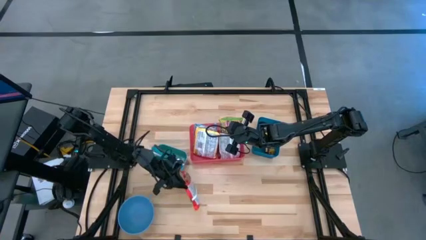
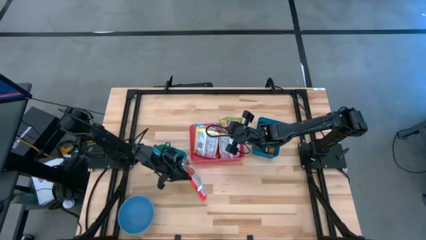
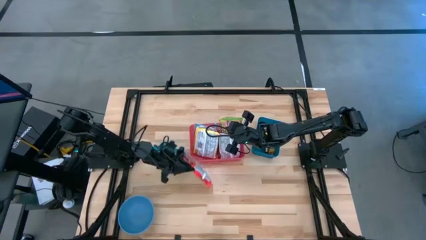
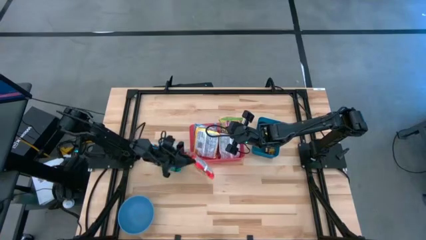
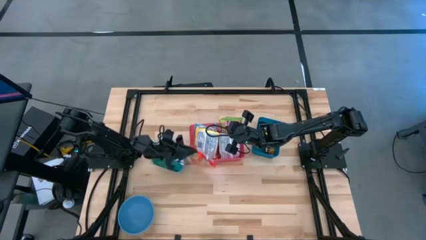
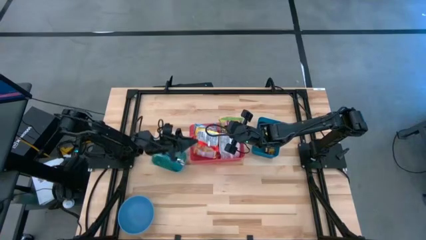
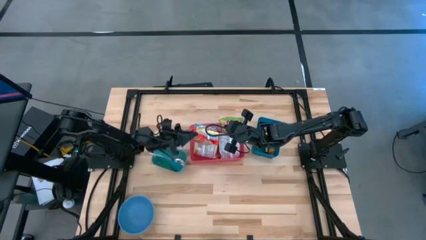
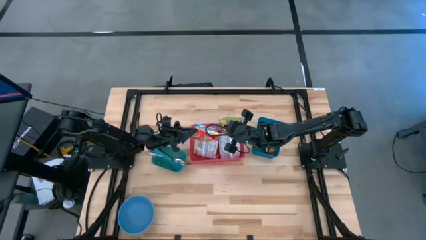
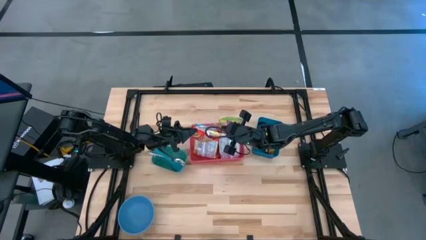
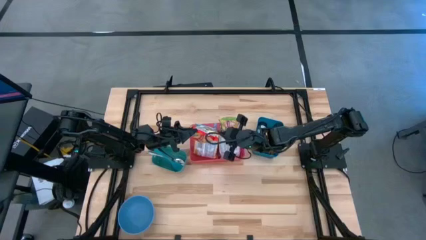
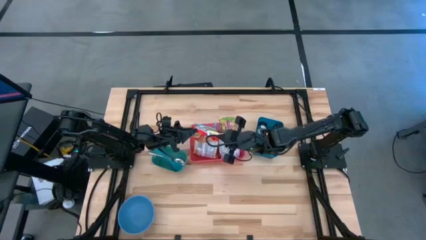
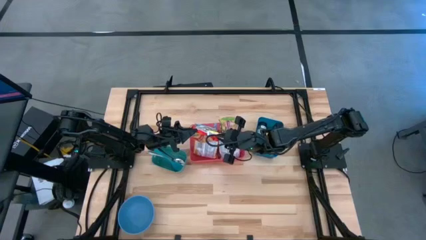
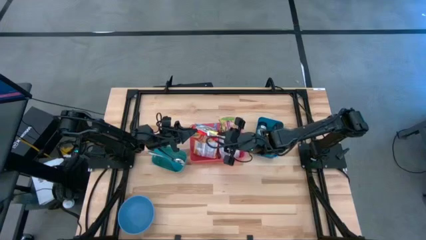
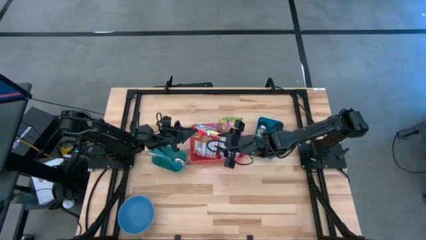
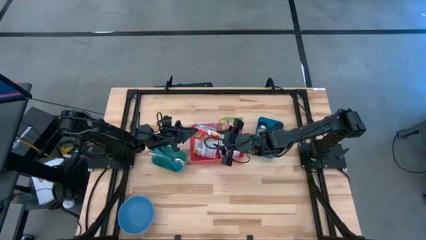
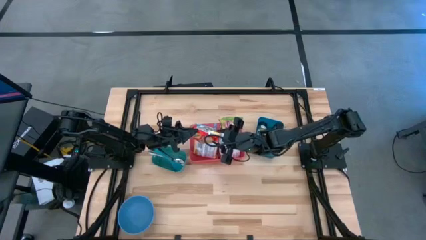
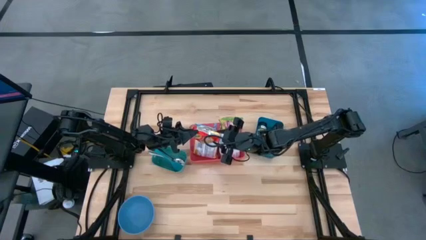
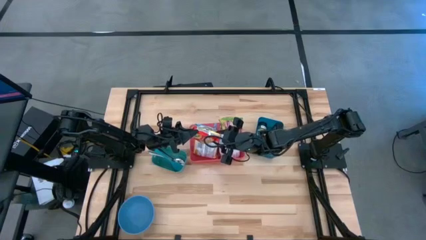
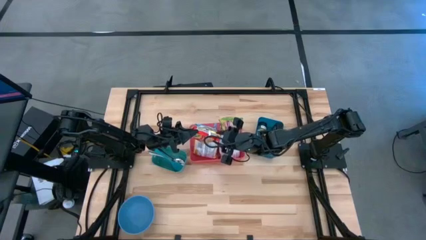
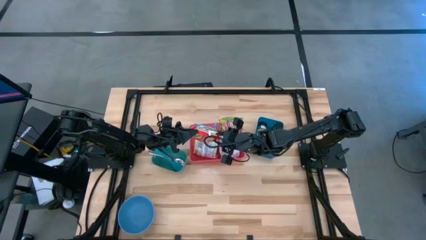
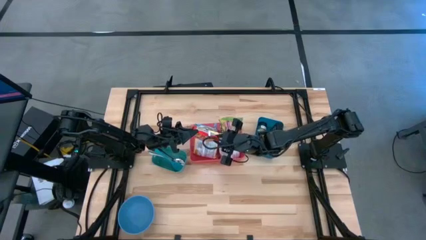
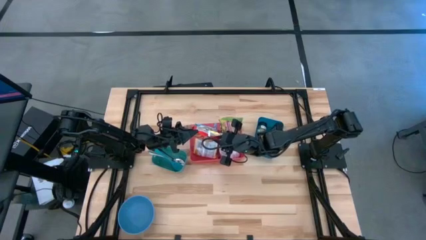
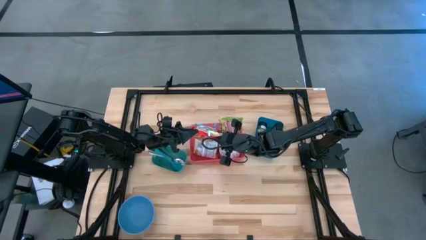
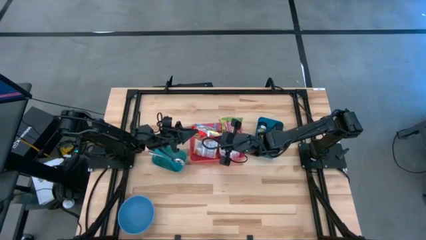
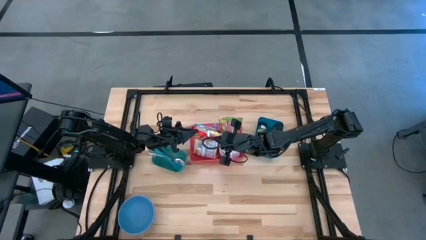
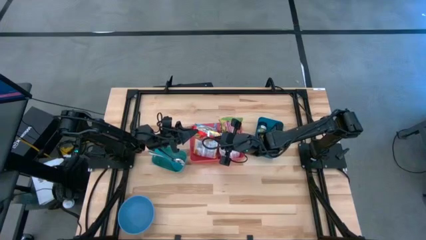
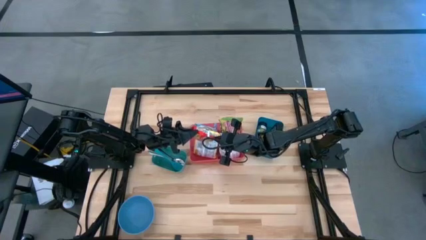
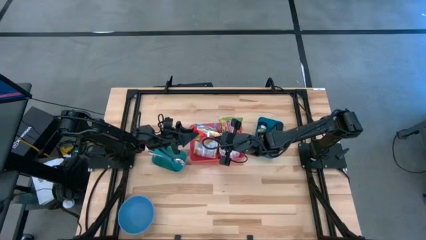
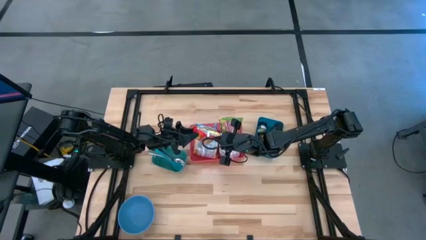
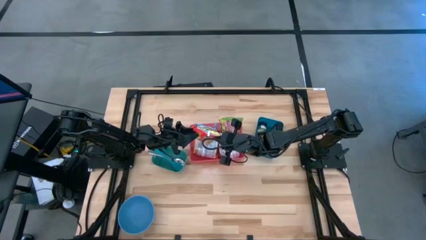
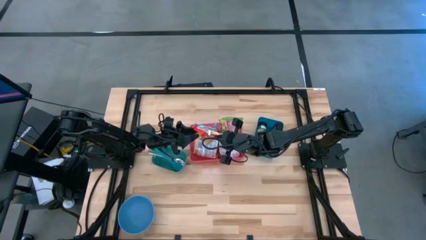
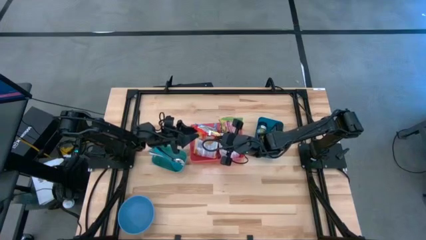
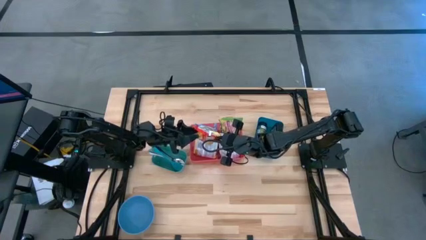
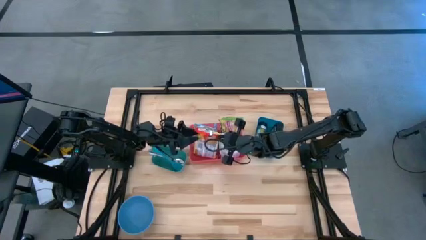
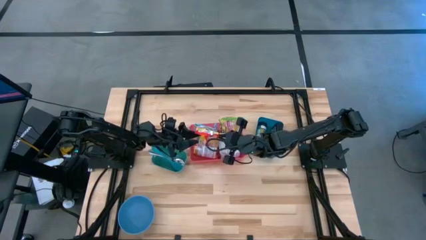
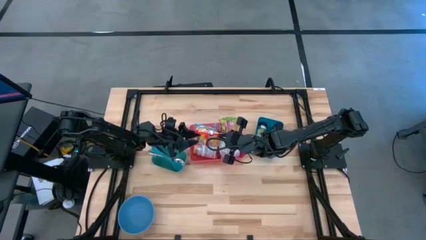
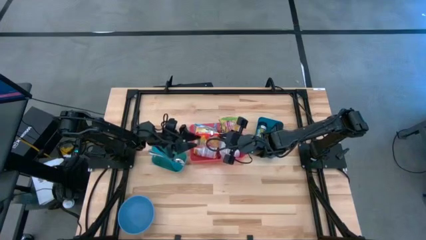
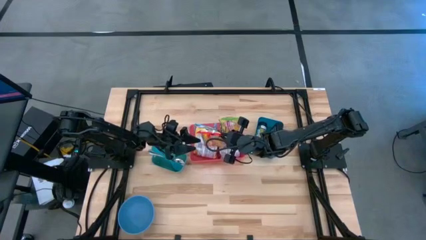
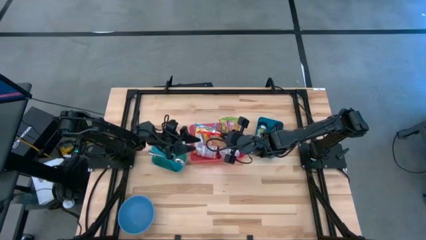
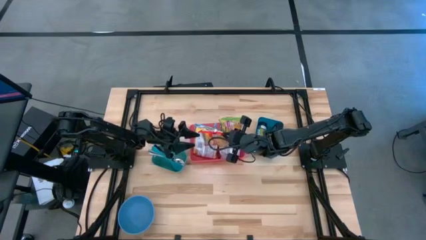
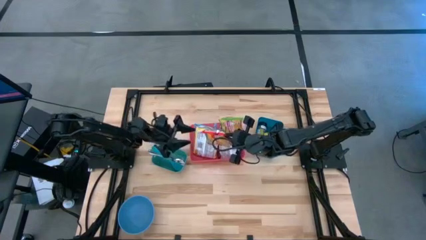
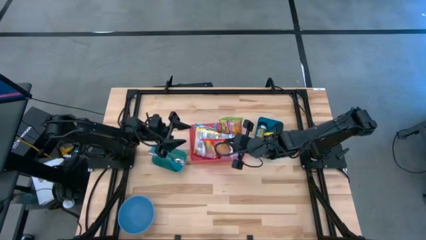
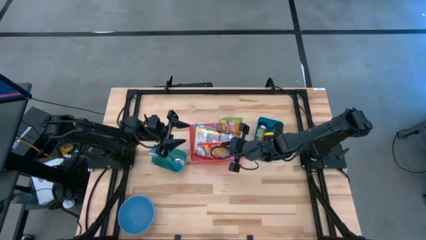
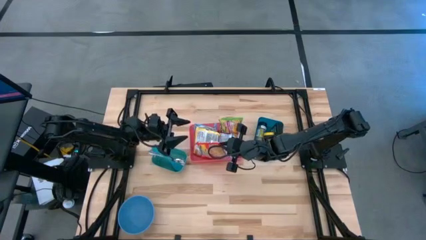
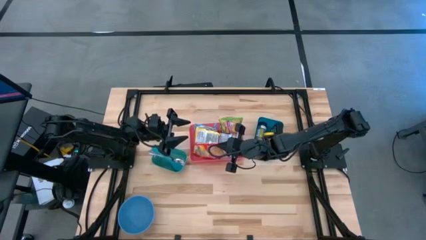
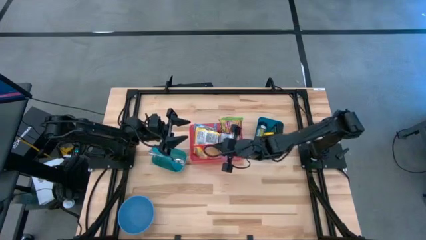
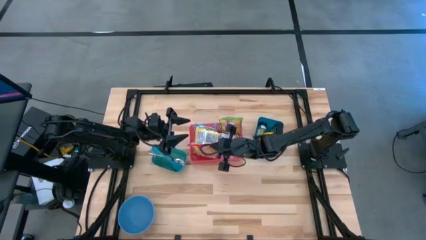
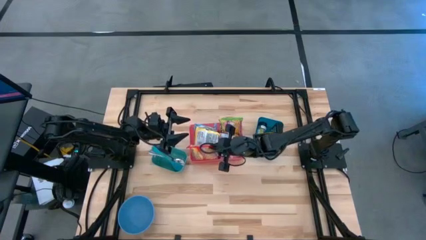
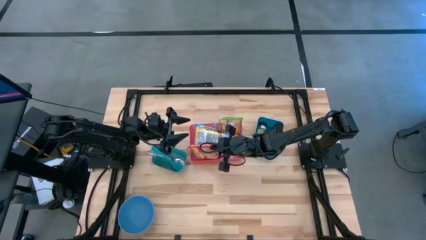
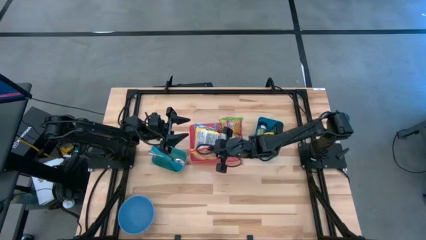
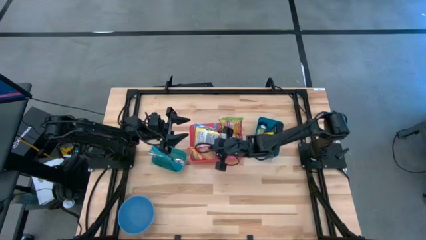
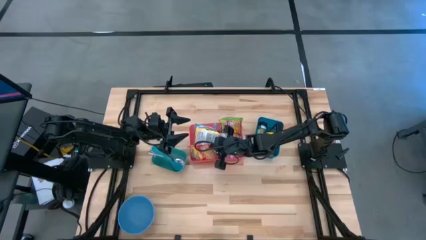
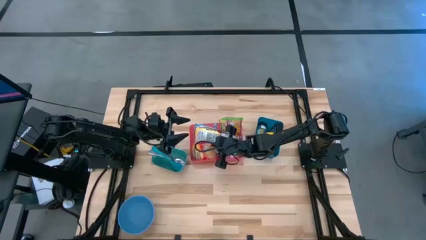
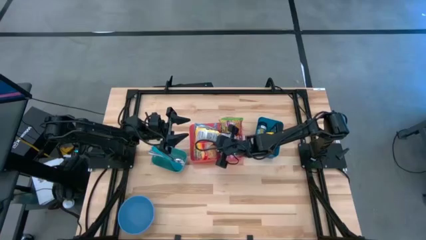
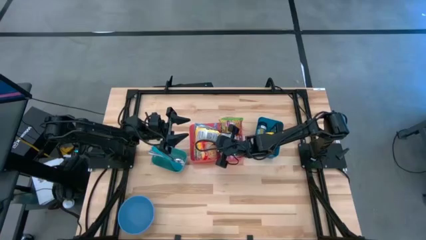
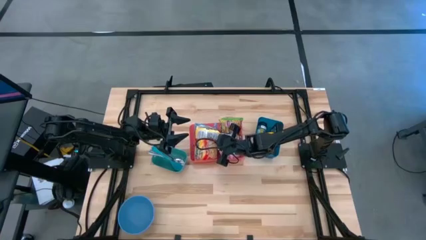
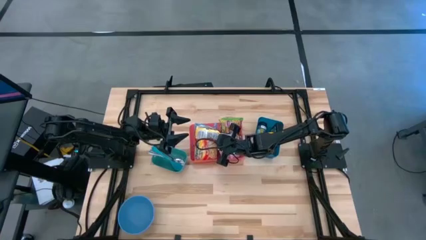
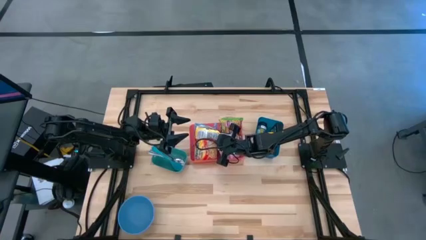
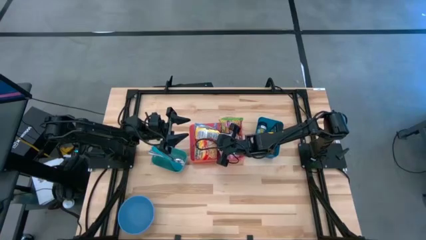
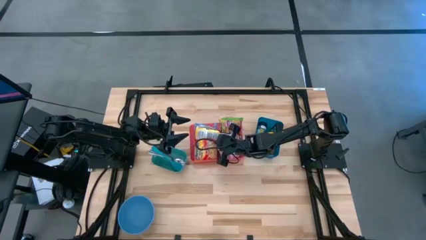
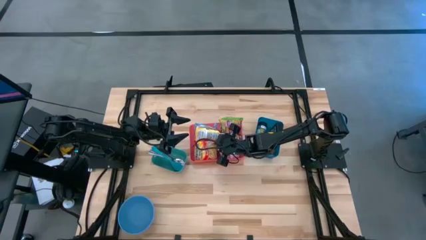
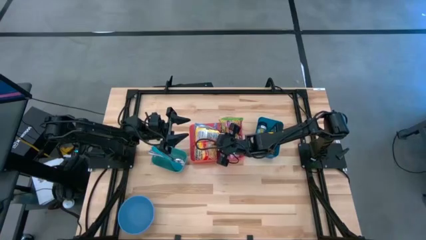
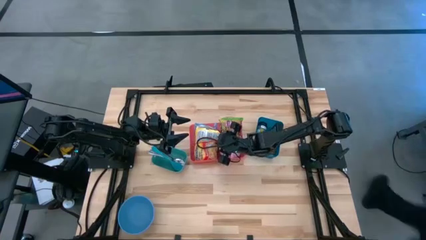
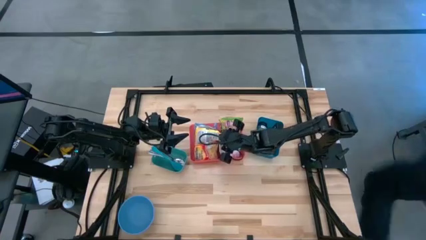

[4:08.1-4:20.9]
Task: Pick & Place Food Item
Put the orange noodle pack into the red bin

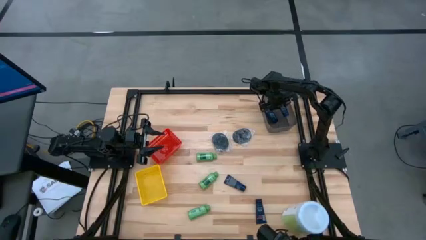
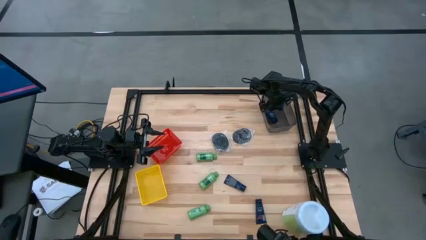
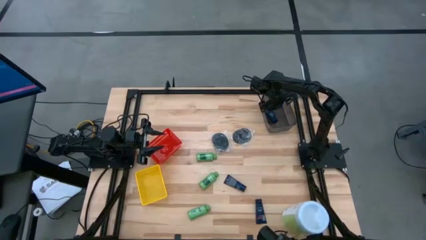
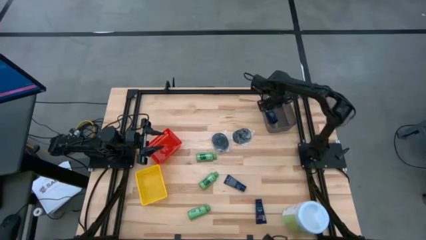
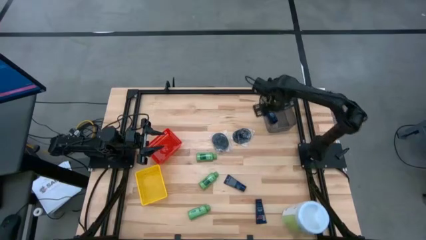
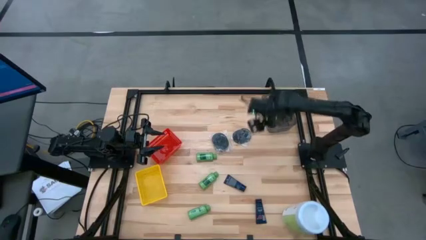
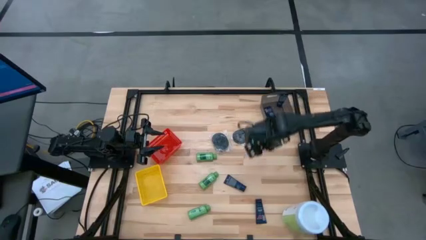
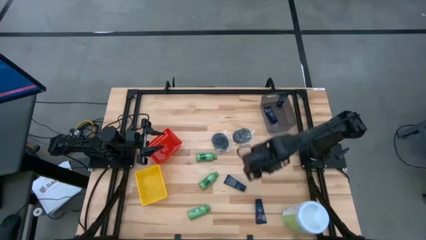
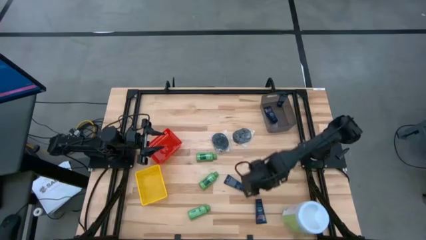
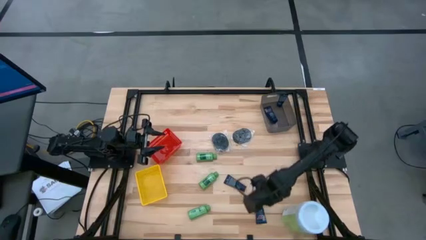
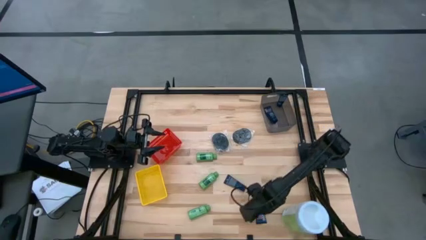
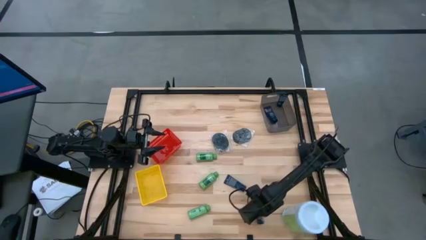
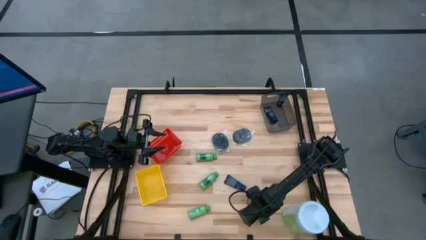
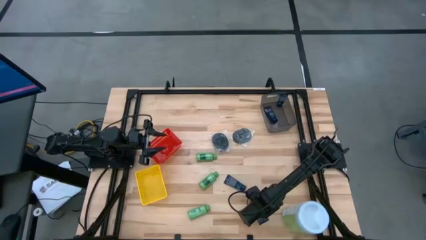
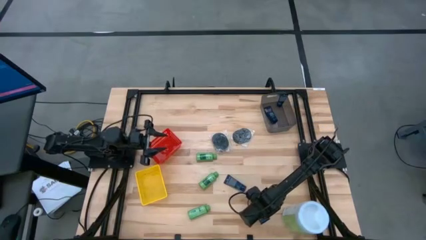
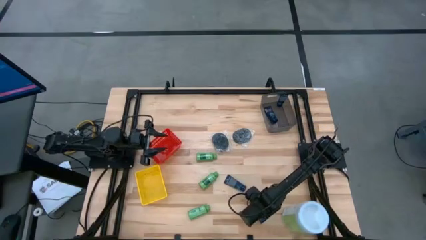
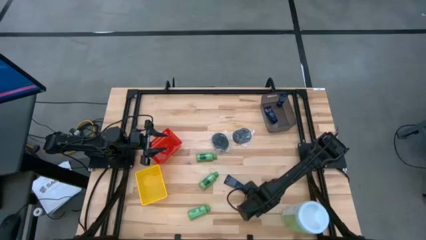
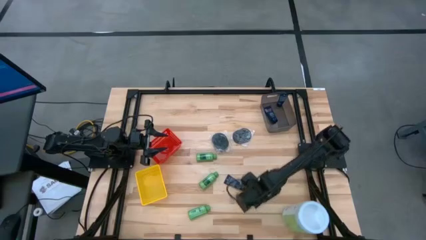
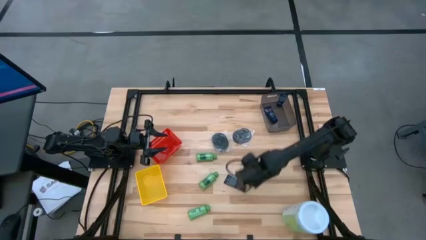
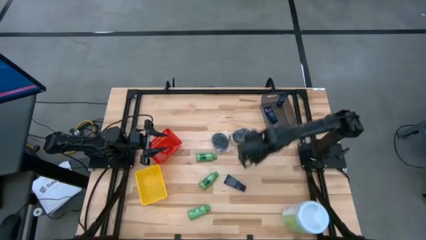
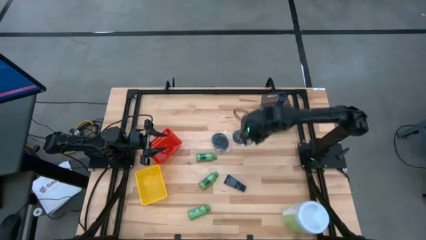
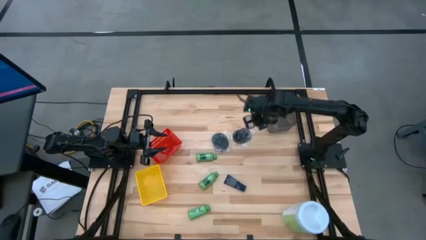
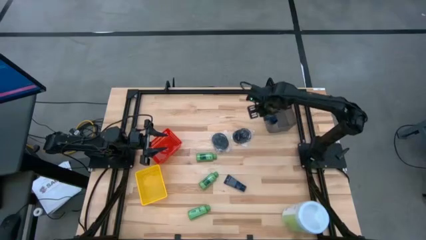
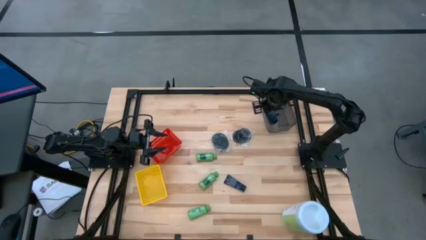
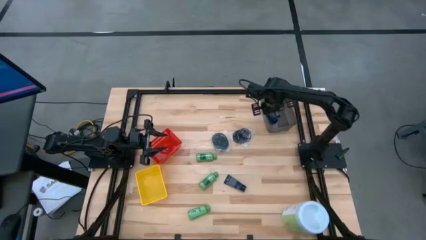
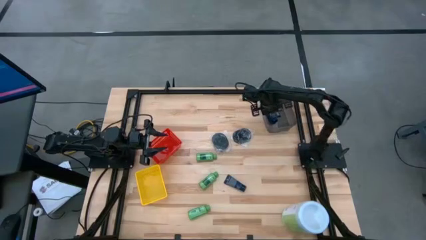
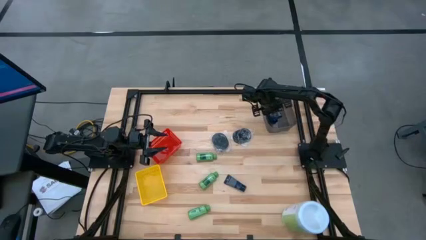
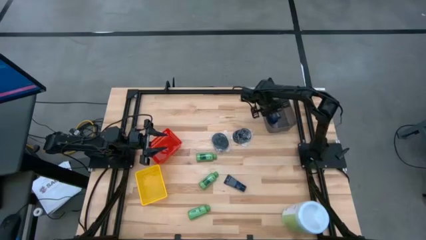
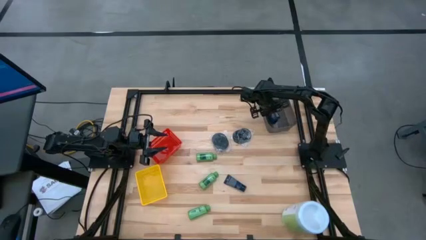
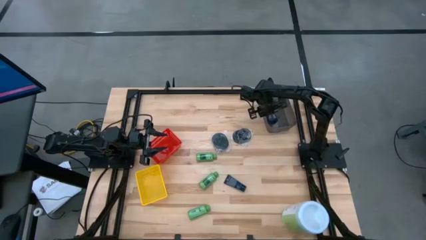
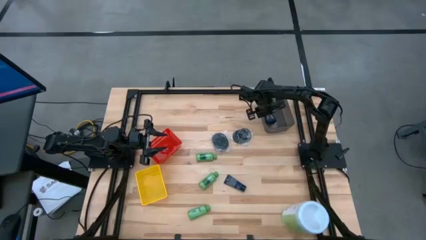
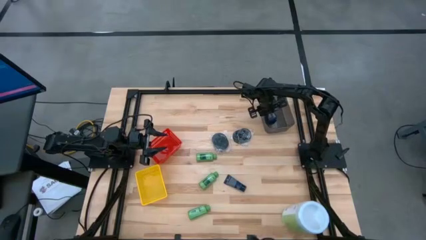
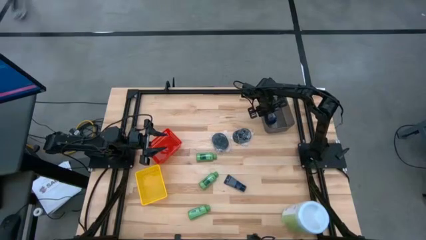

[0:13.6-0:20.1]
Task: Pick & Place Travel size toiletries
Put the shaving cream into the black bin
